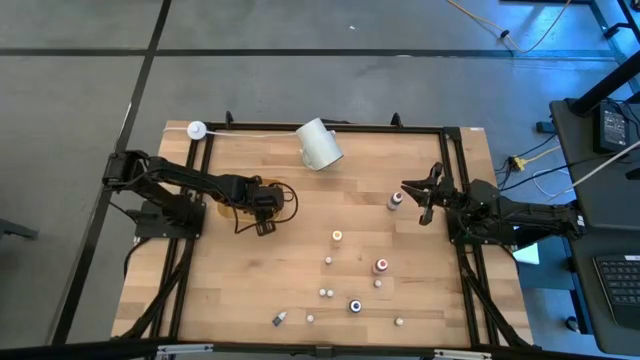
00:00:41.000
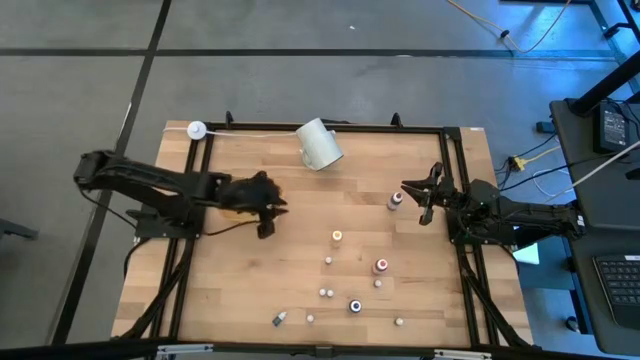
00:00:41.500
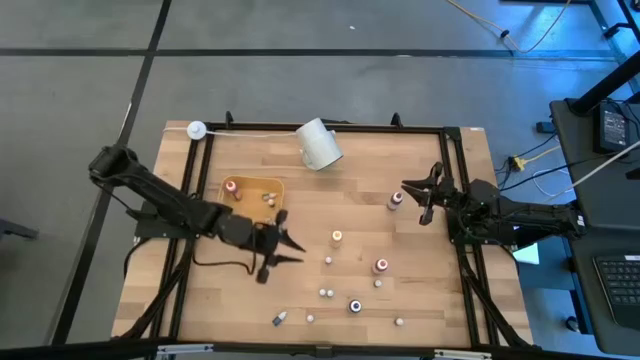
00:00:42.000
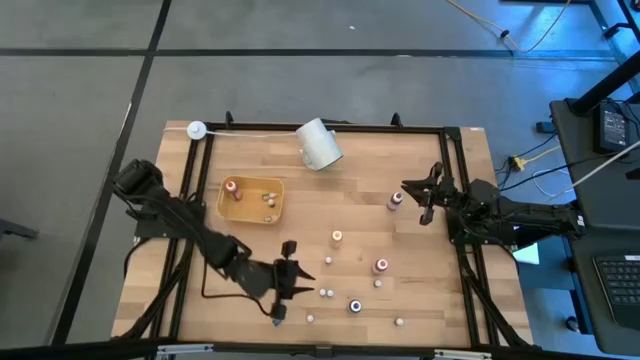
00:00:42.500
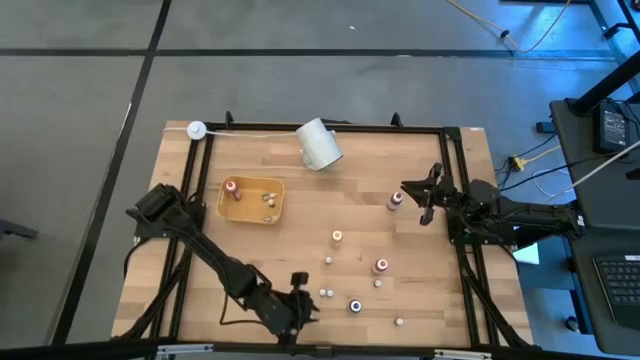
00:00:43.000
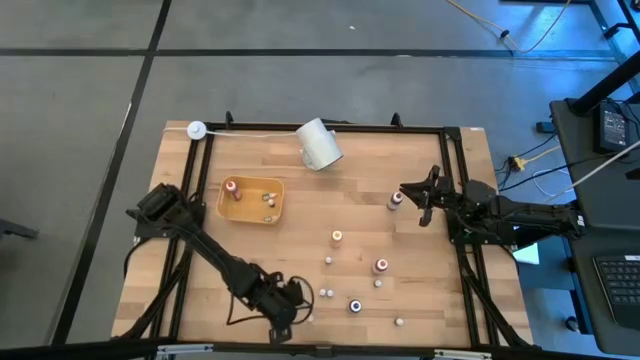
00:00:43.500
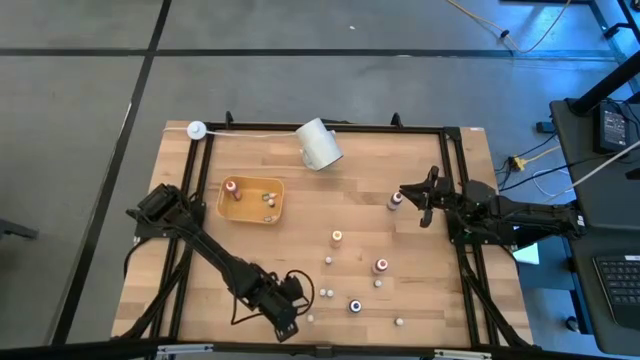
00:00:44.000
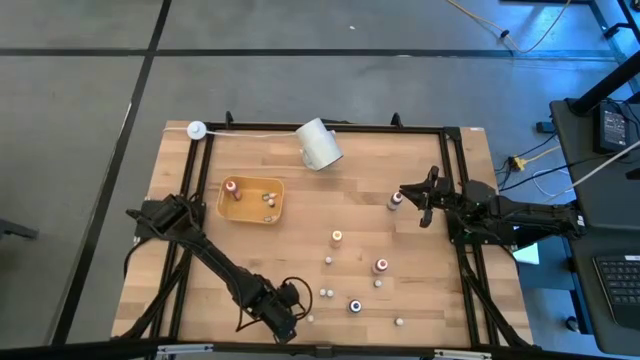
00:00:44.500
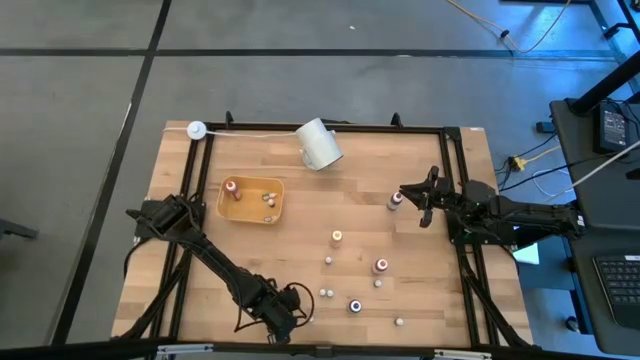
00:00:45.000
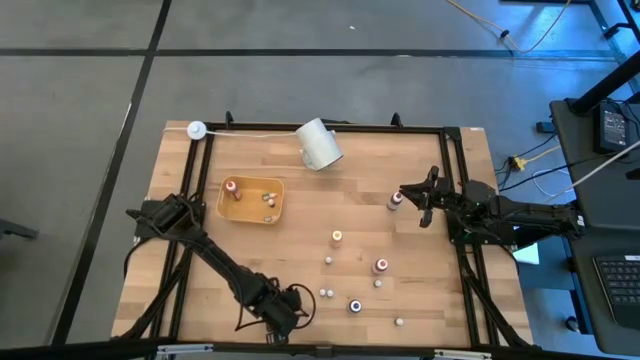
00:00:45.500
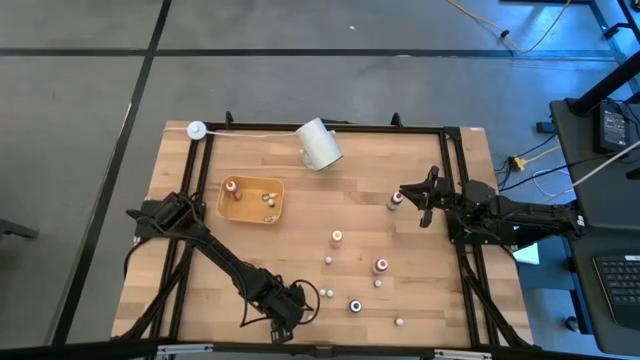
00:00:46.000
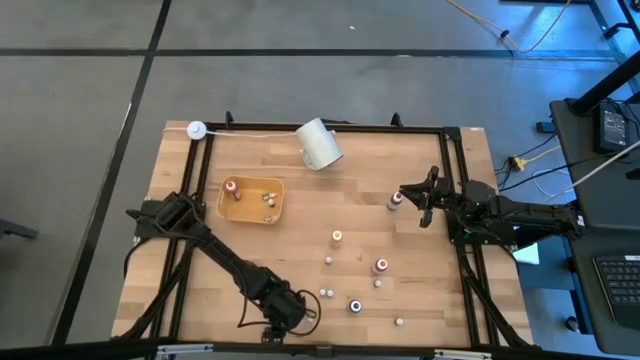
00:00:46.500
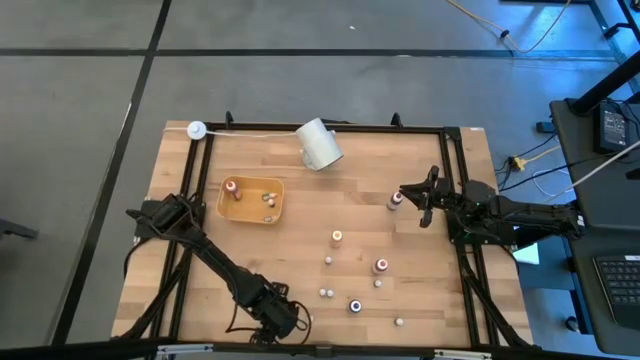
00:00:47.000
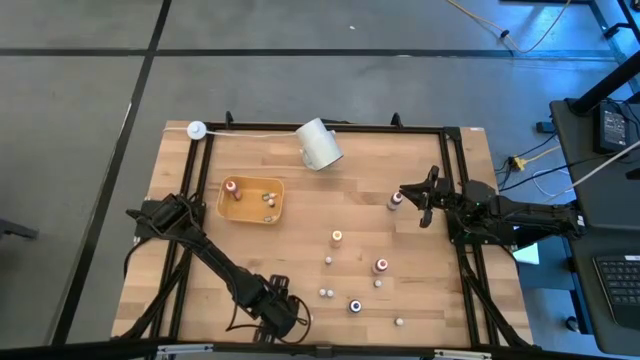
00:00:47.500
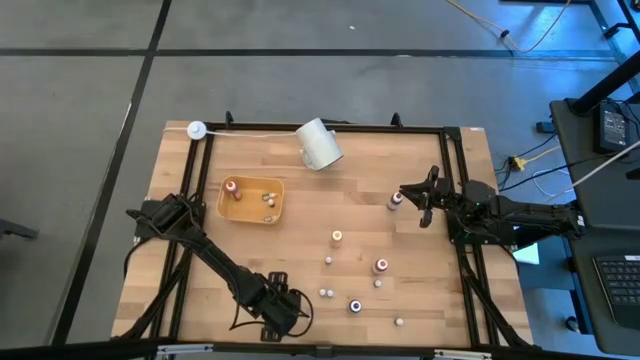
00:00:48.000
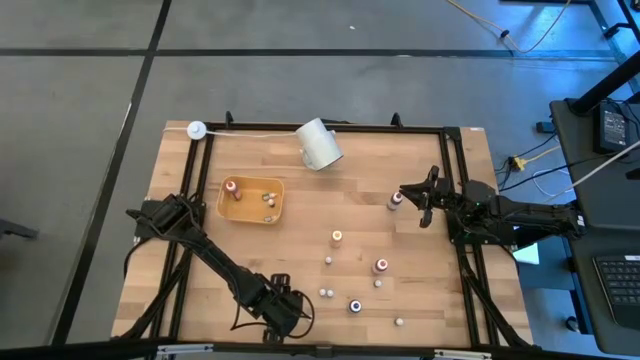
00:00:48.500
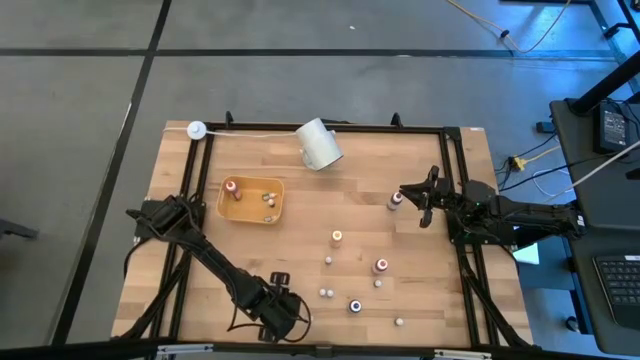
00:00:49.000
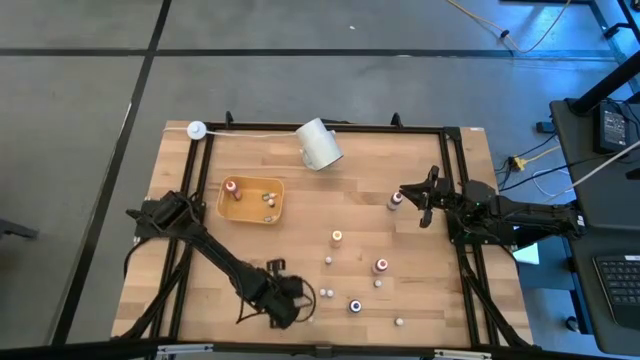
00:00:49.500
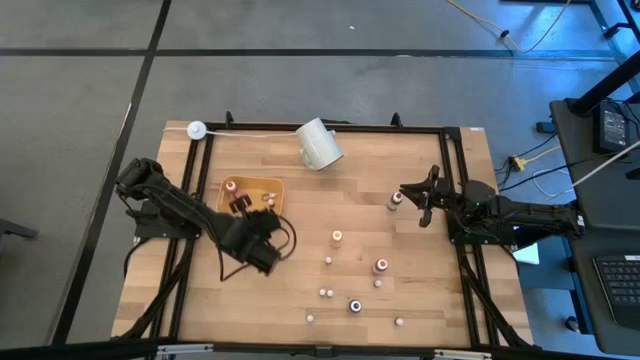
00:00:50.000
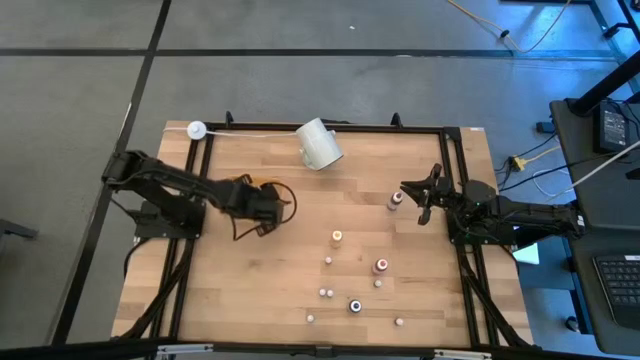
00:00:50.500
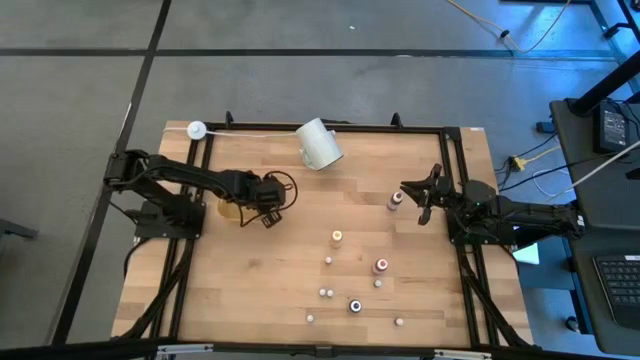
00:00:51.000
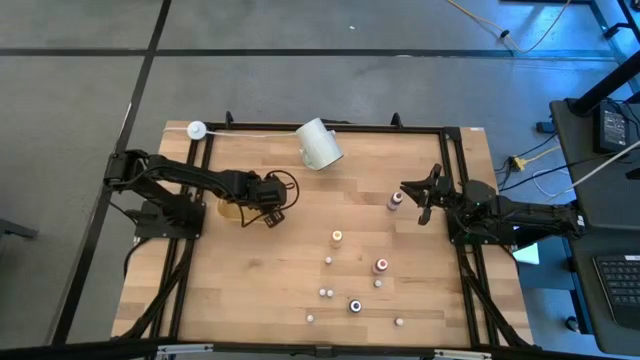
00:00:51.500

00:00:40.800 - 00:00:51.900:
Task: Pick & Place food coloring
Put the bottom small blue food coloring bottle into the bin

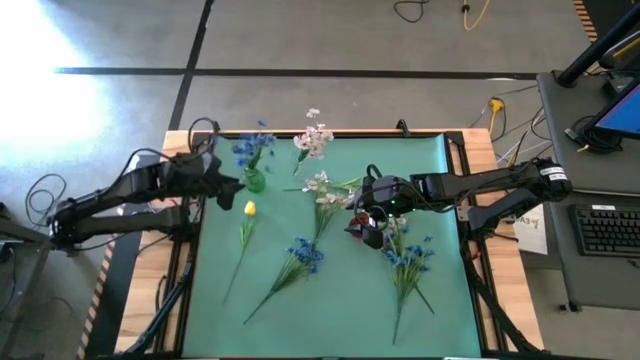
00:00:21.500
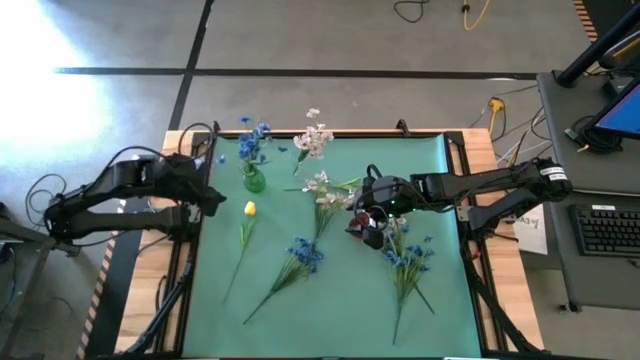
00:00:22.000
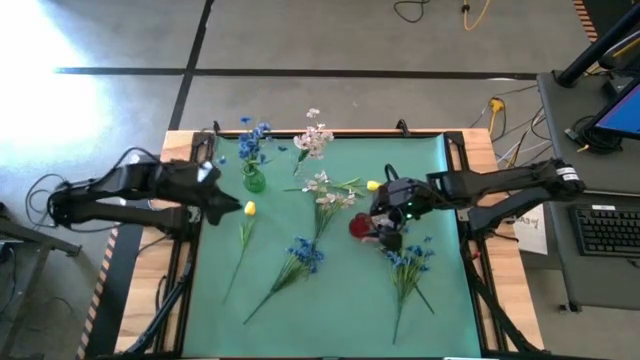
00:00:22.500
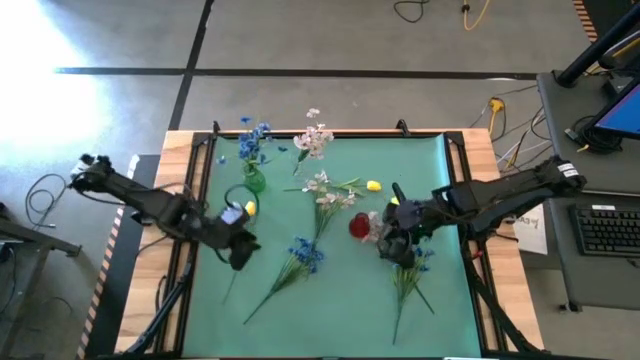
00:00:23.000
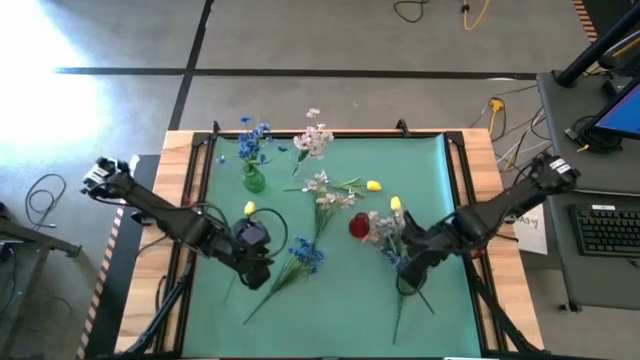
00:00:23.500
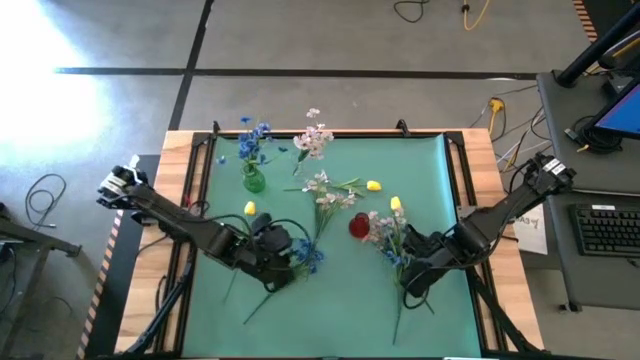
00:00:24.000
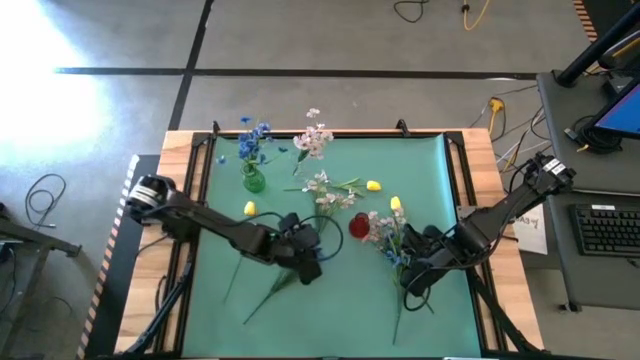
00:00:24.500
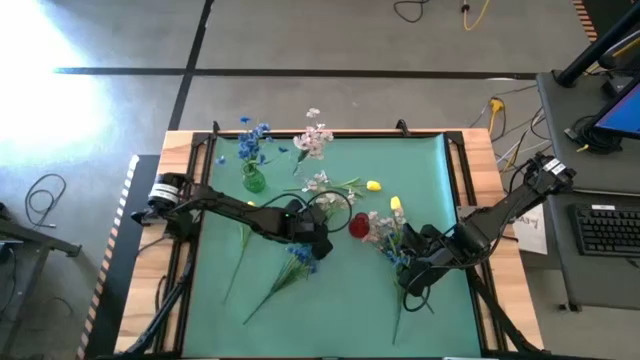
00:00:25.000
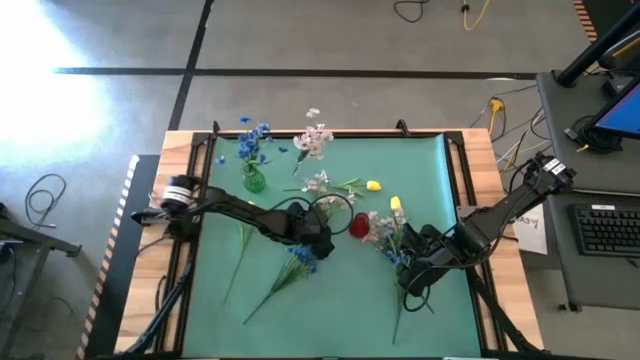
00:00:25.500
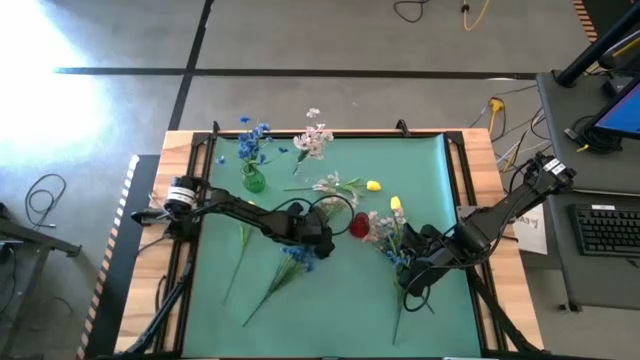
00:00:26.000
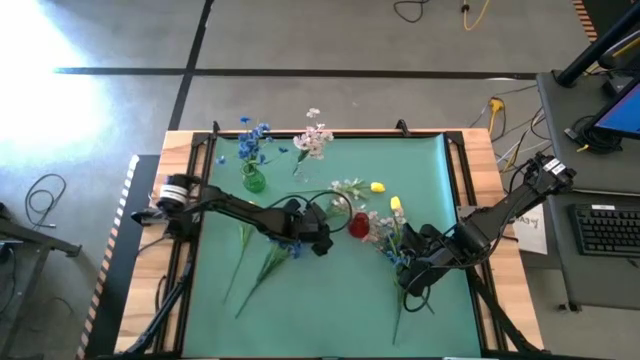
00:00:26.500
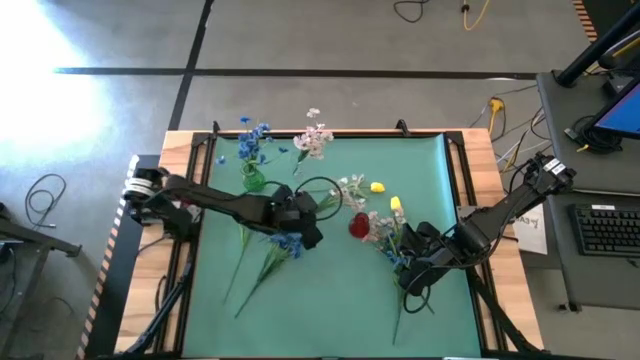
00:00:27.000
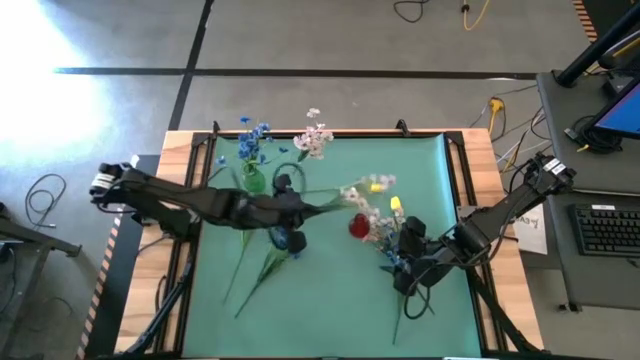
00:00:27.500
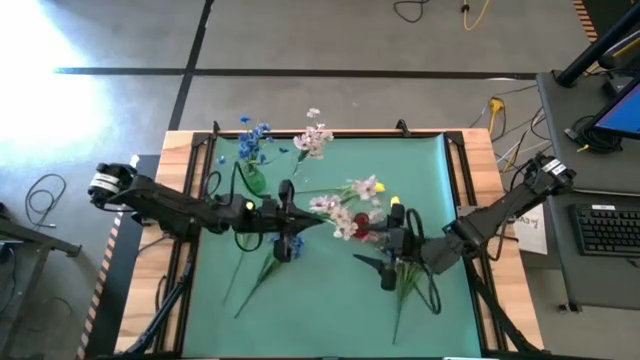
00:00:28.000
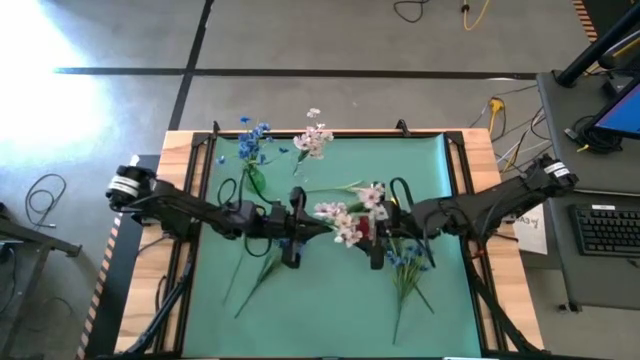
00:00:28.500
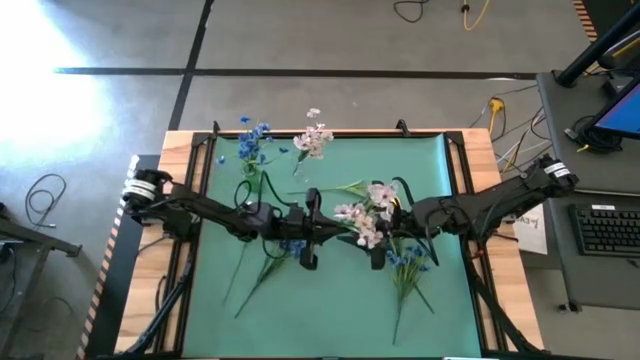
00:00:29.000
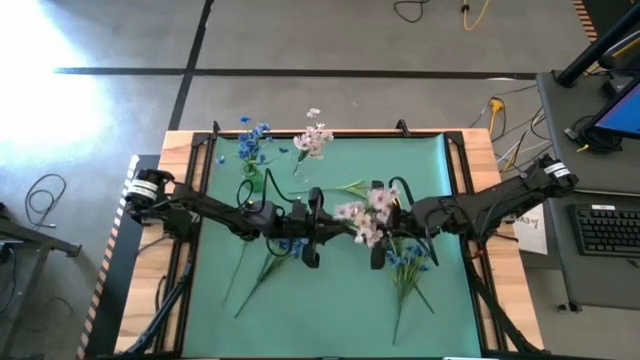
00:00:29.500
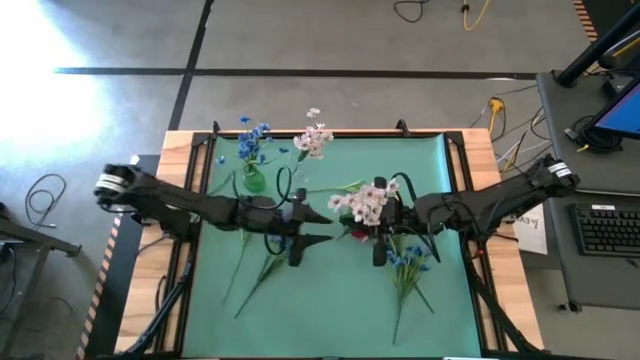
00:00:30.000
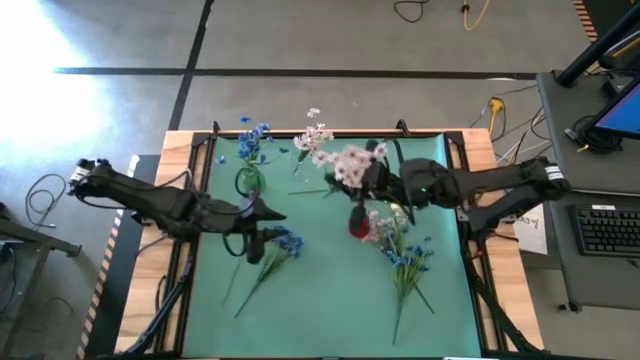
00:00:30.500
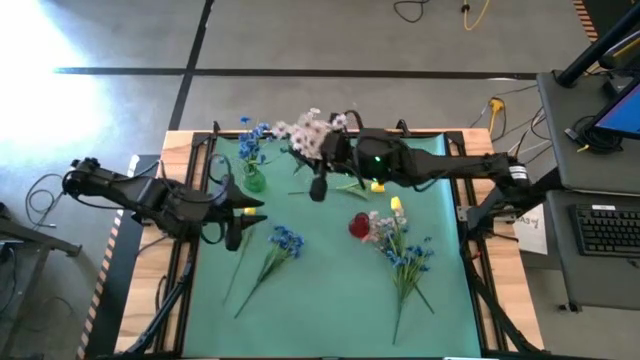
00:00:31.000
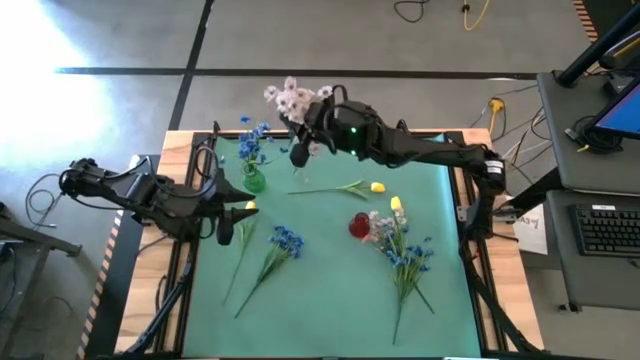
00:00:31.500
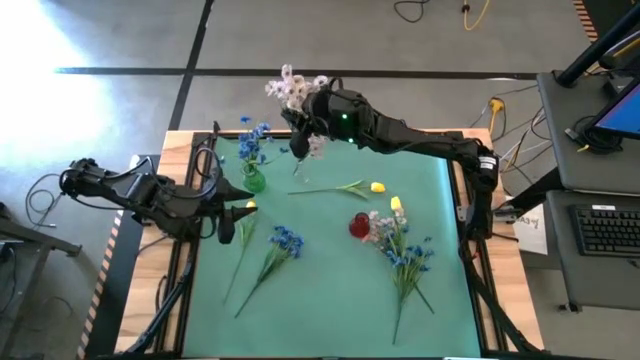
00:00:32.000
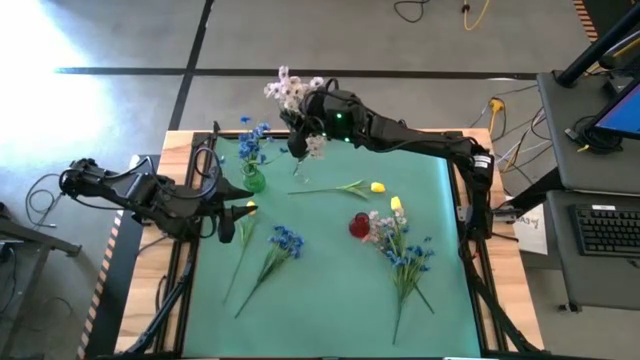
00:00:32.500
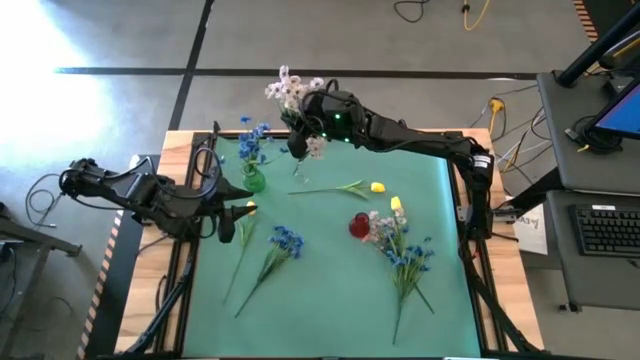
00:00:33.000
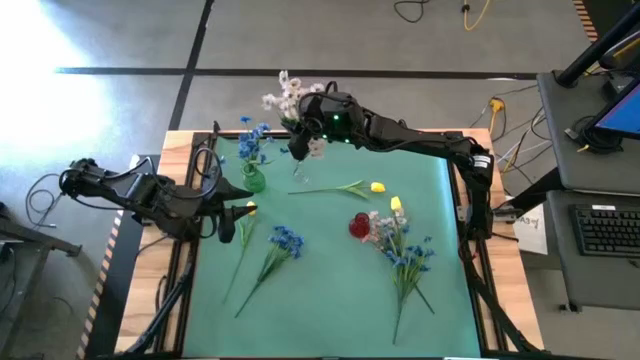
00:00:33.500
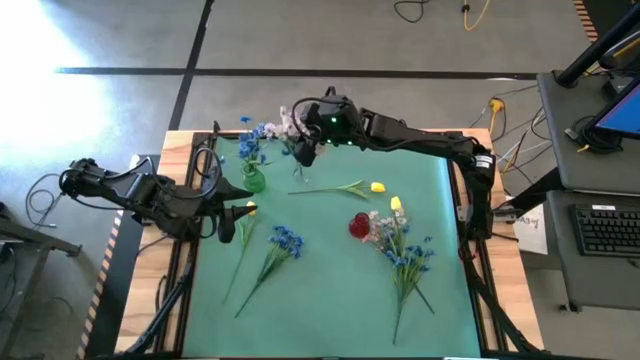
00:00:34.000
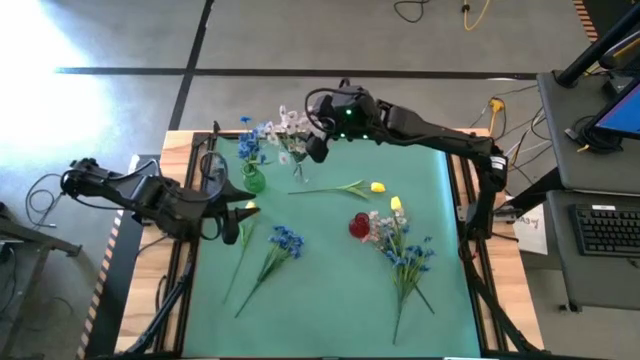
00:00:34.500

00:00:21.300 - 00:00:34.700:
Task: Sort flowers into vase by color
Put the left white flowers into the transparent vas
